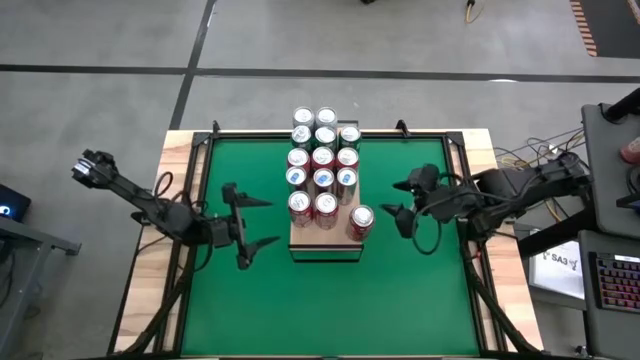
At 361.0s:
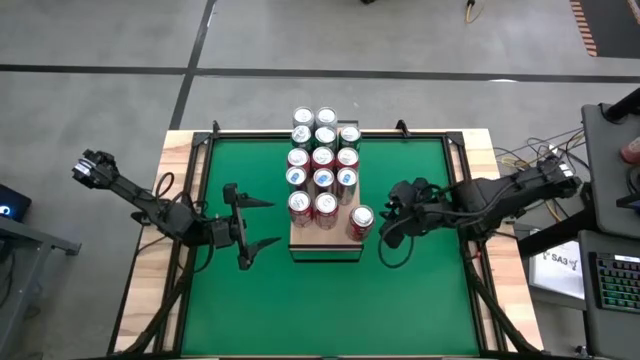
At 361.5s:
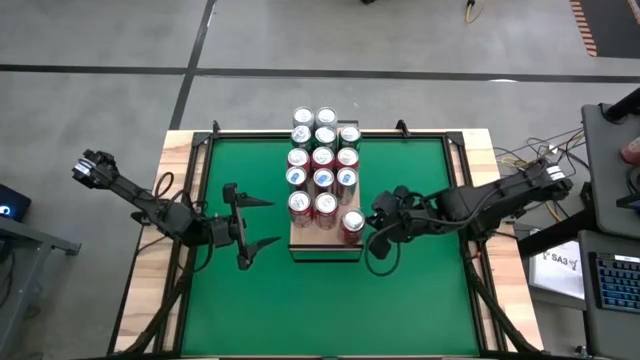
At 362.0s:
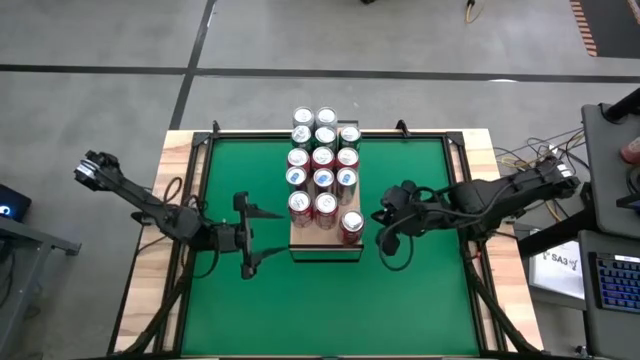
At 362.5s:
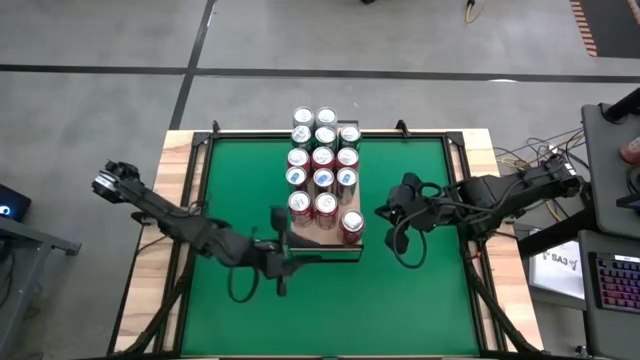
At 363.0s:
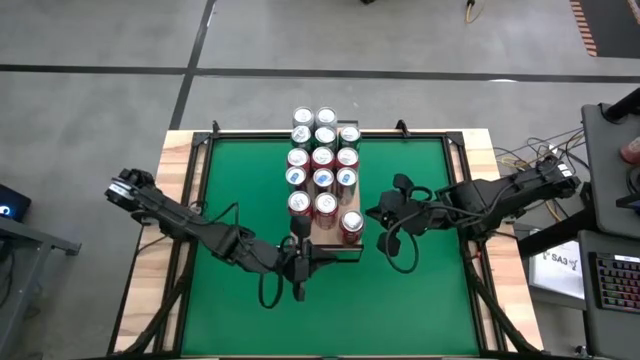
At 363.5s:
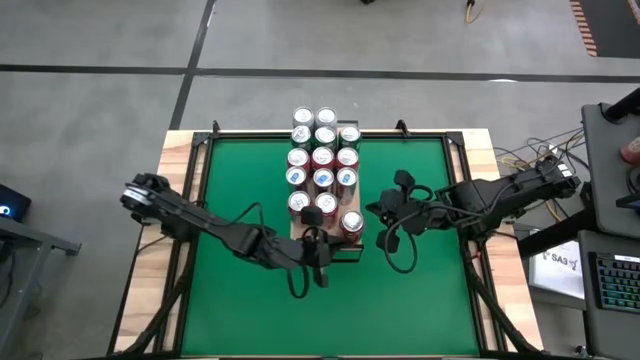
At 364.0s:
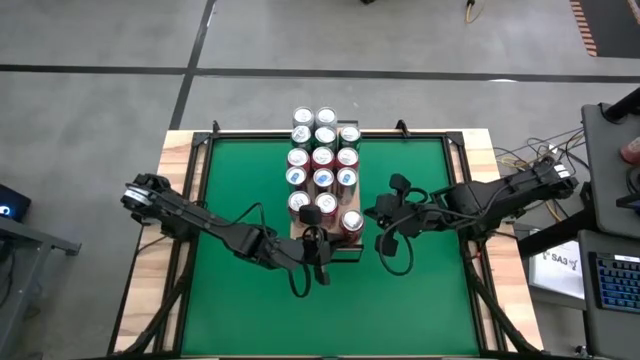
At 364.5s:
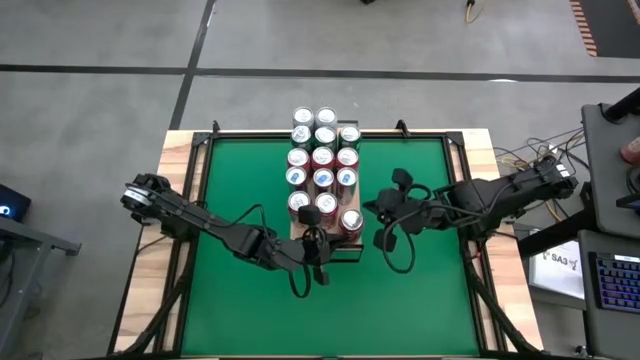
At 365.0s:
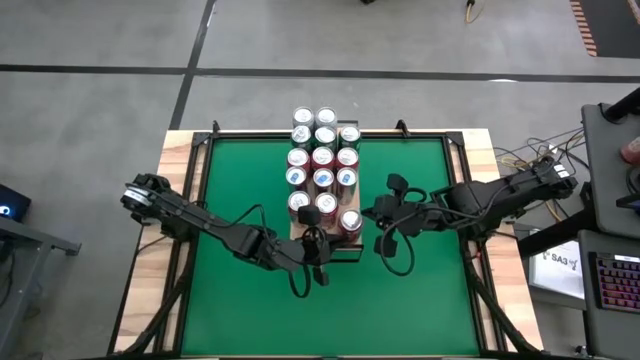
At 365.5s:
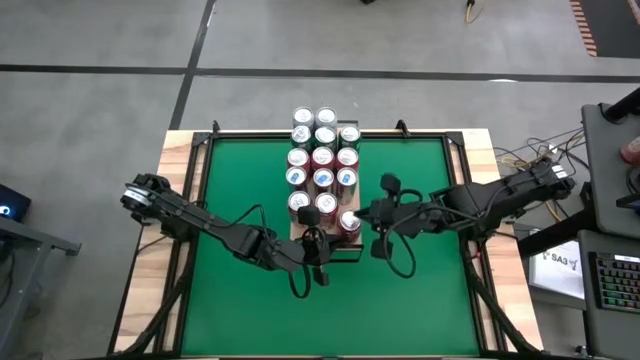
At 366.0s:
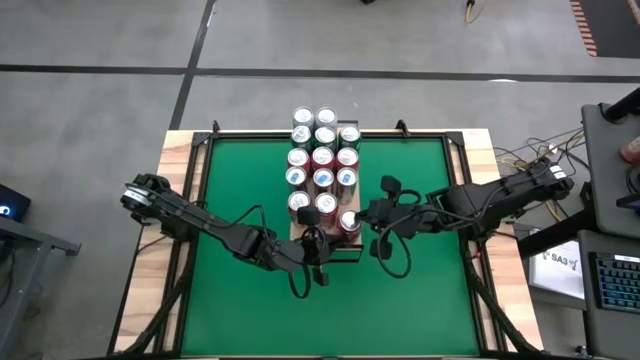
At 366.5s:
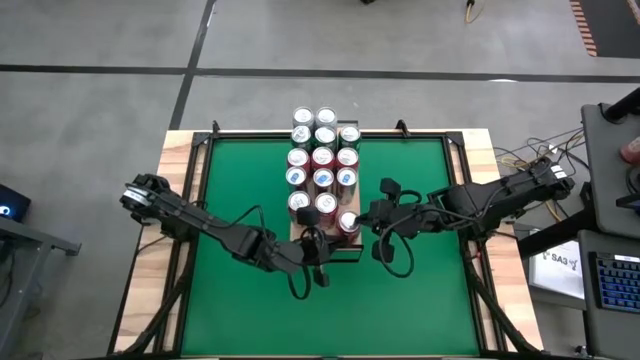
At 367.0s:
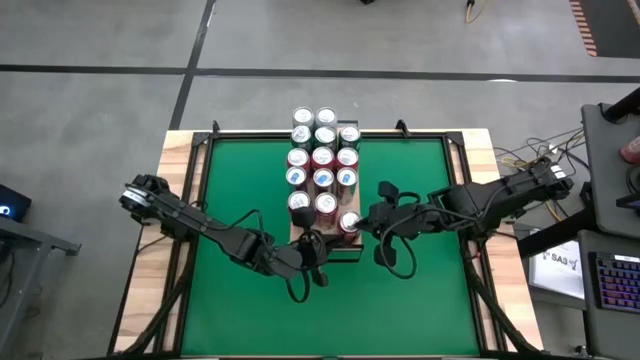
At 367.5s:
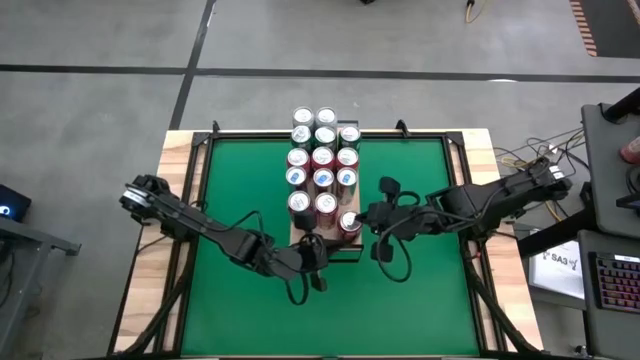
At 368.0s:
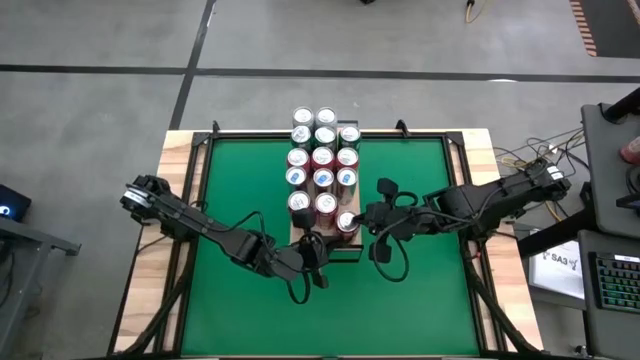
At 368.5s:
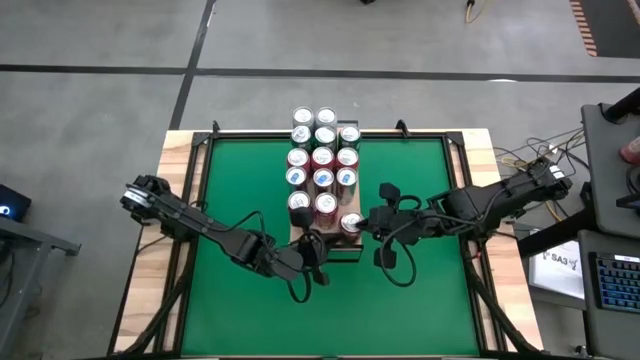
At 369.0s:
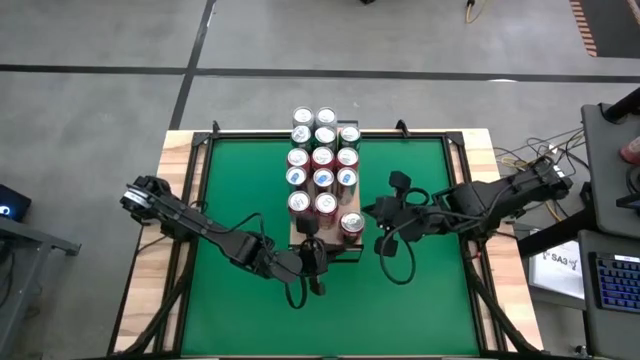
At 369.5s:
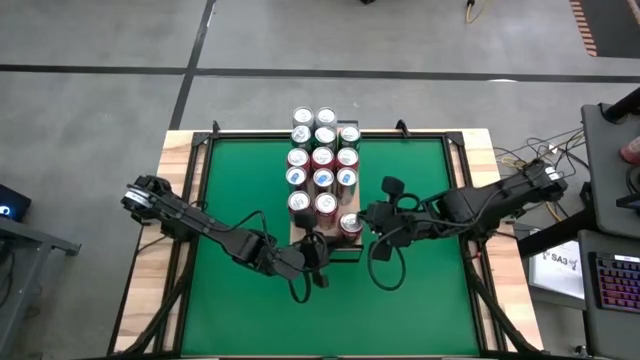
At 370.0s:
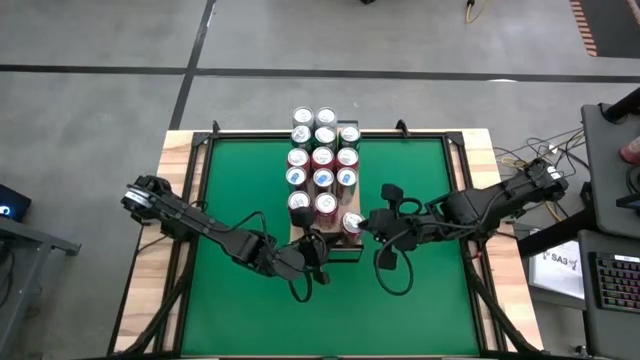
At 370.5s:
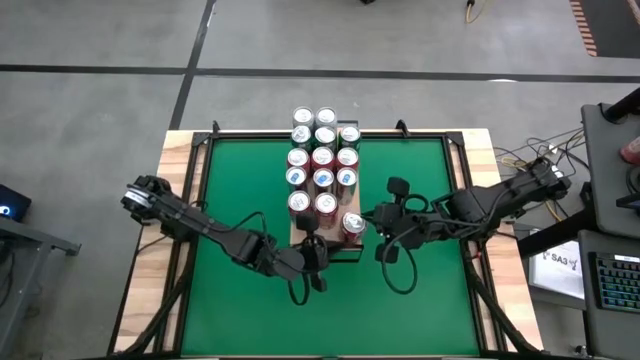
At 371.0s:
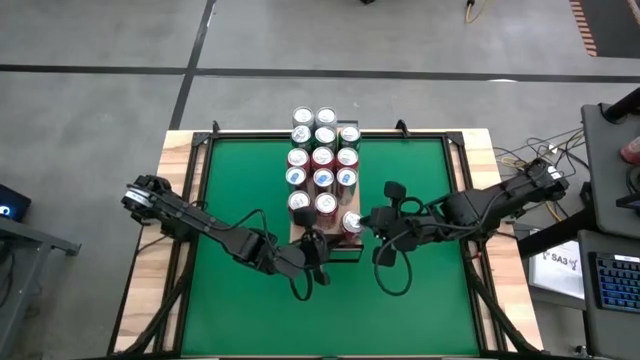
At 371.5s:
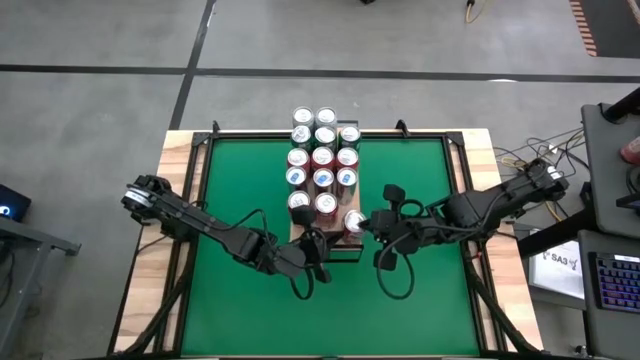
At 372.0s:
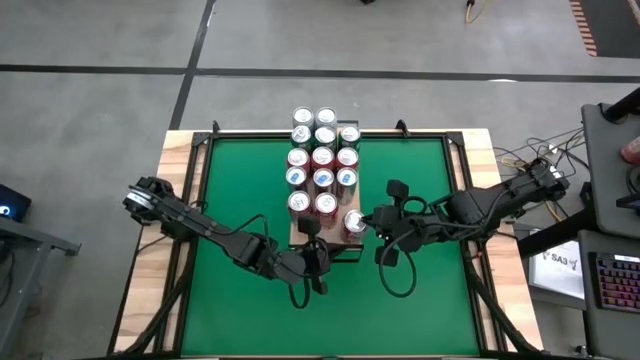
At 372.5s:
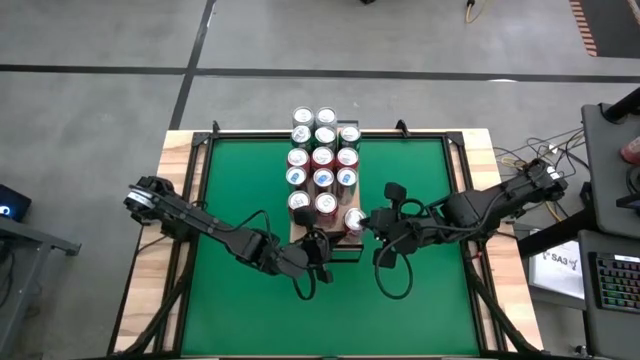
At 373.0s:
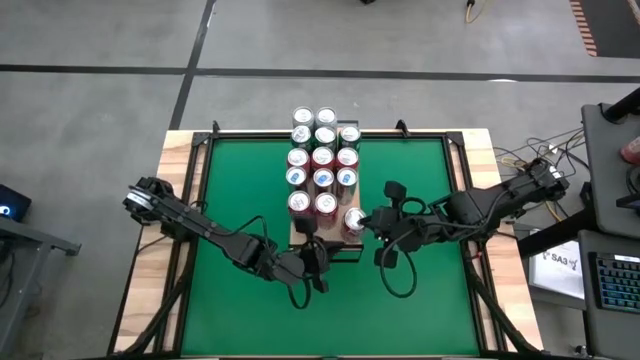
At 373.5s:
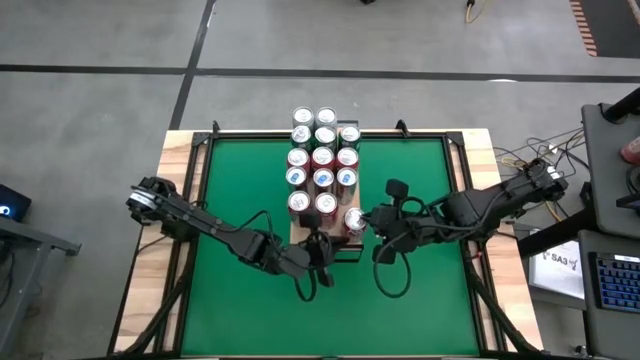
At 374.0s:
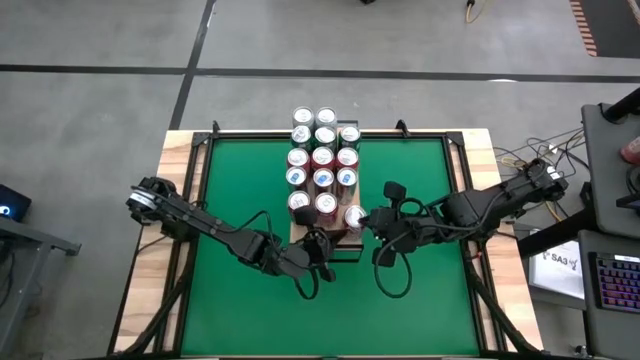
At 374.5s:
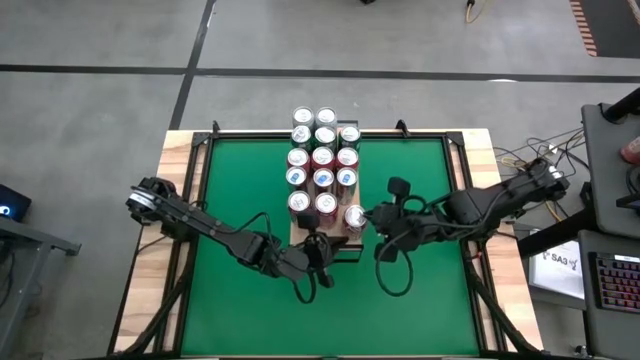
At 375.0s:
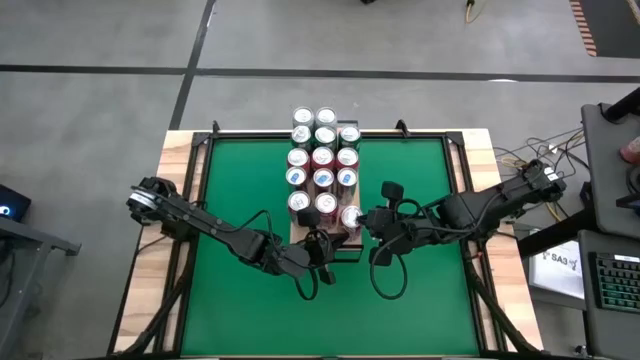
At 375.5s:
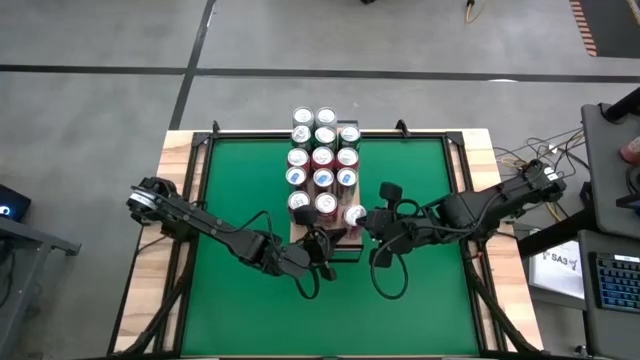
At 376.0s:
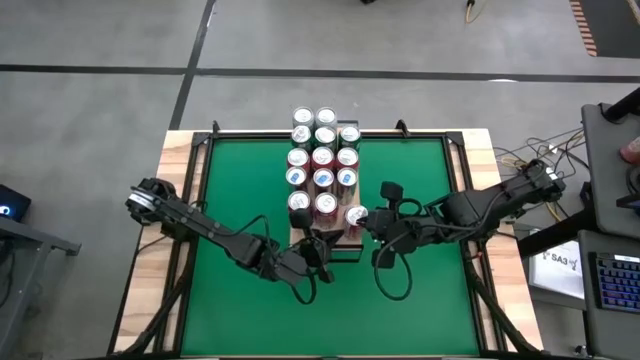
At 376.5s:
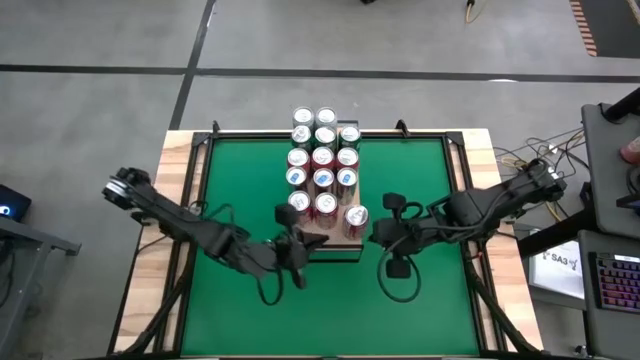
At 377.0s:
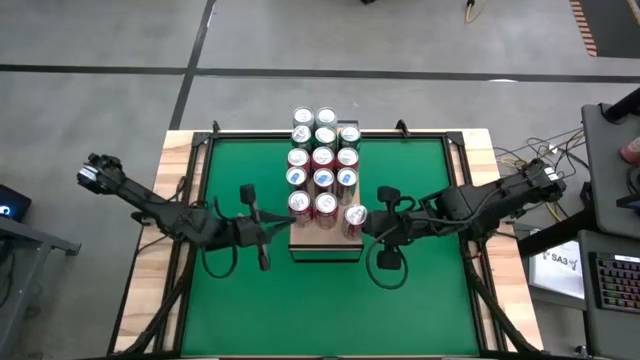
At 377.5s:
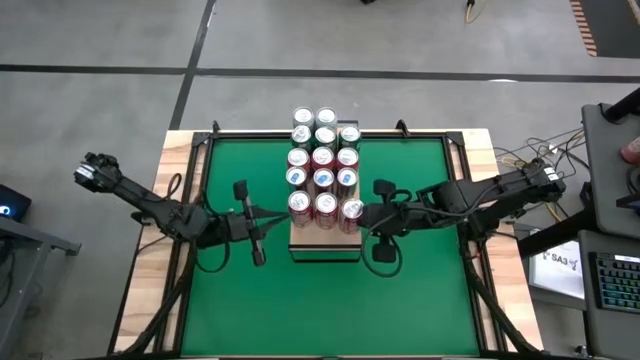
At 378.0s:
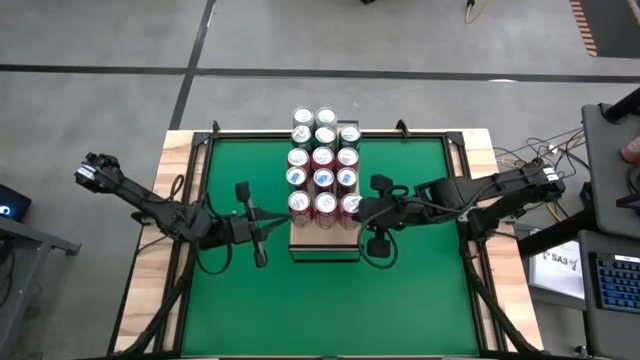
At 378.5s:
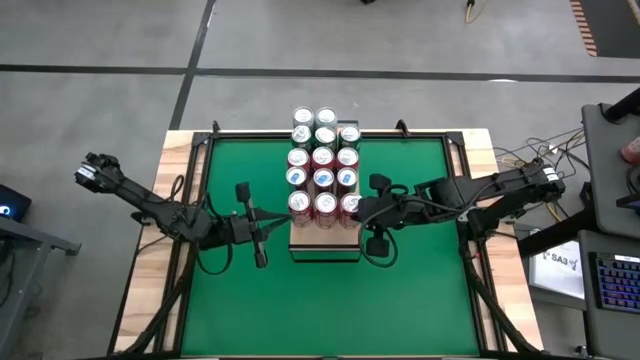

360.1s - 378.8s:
Task: Place canned beverage on shelf
Put the red can on the shelf
